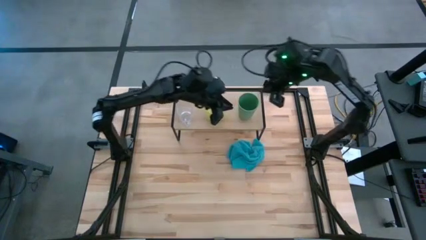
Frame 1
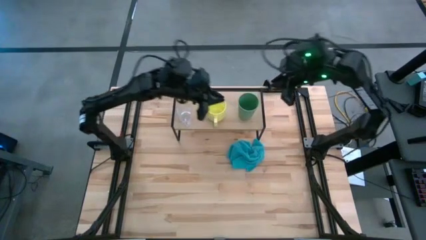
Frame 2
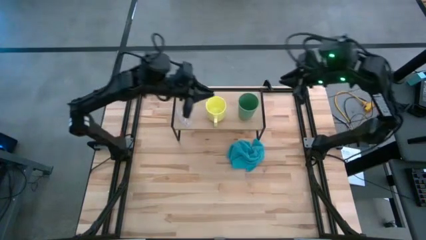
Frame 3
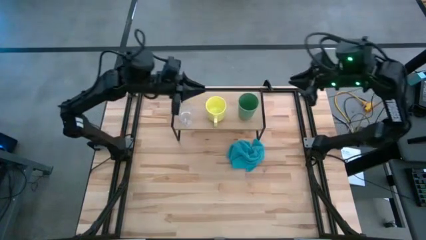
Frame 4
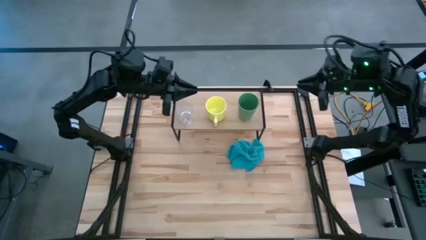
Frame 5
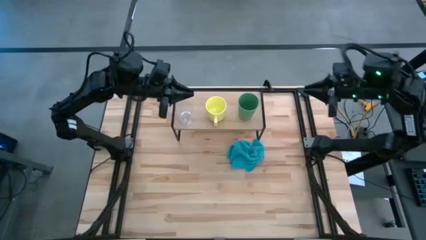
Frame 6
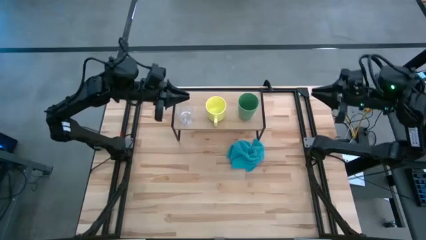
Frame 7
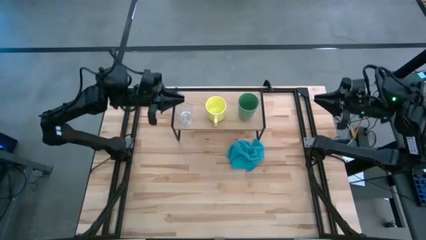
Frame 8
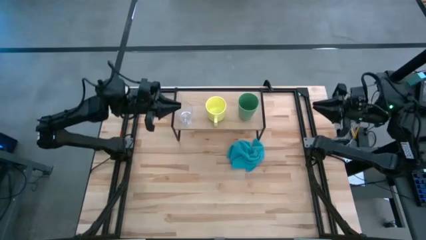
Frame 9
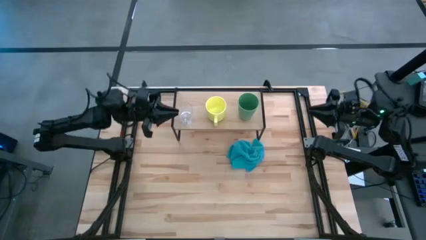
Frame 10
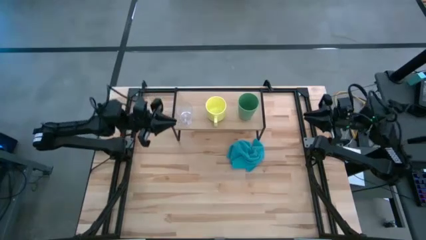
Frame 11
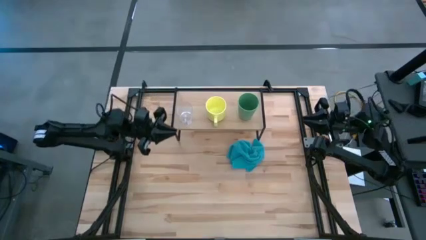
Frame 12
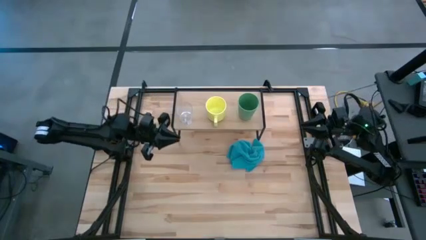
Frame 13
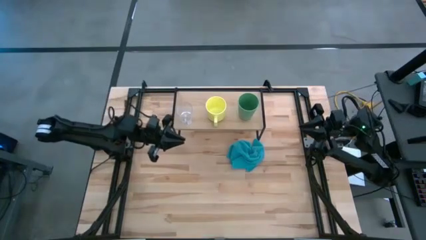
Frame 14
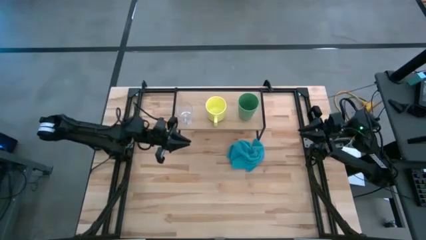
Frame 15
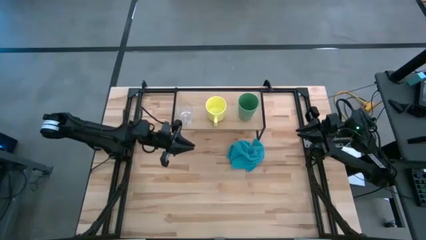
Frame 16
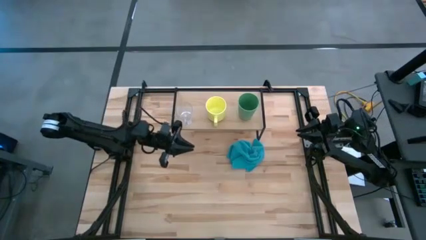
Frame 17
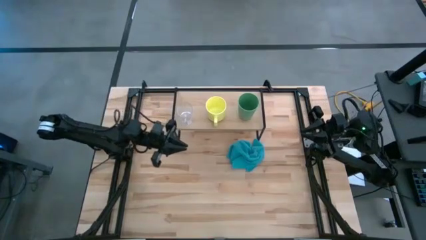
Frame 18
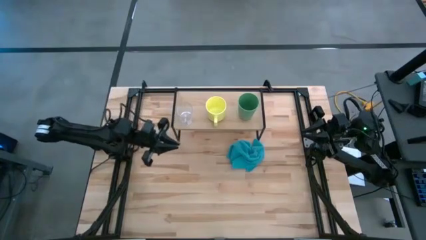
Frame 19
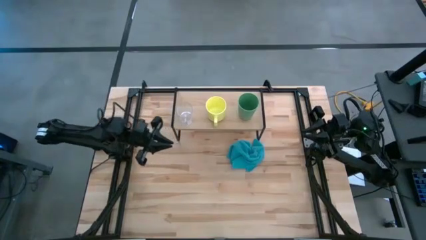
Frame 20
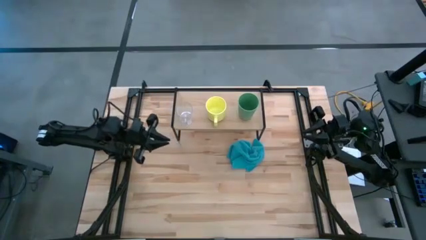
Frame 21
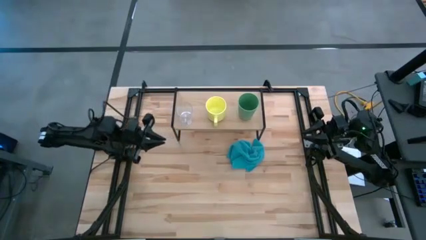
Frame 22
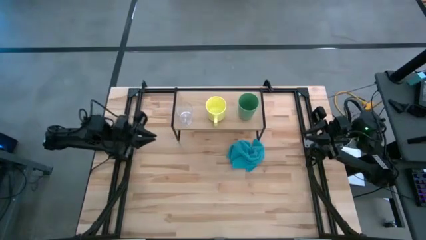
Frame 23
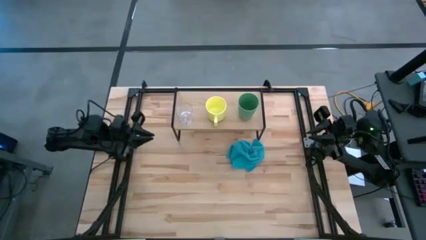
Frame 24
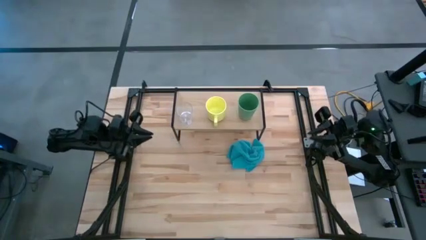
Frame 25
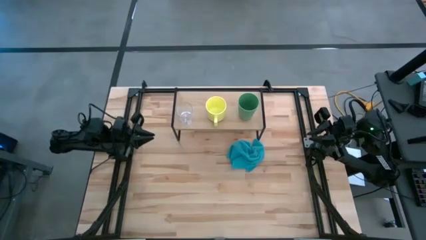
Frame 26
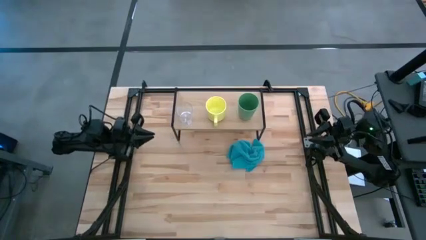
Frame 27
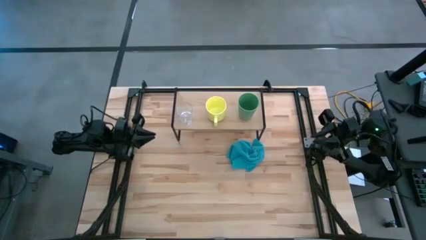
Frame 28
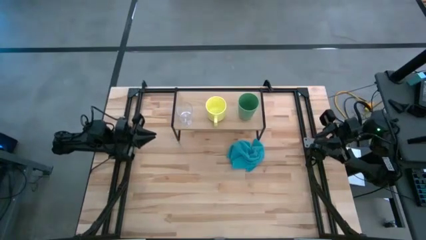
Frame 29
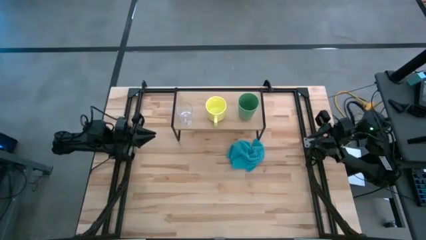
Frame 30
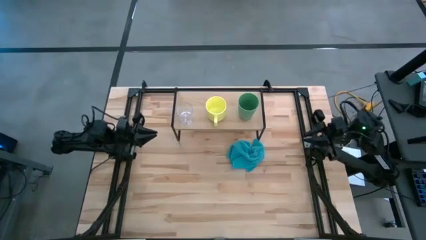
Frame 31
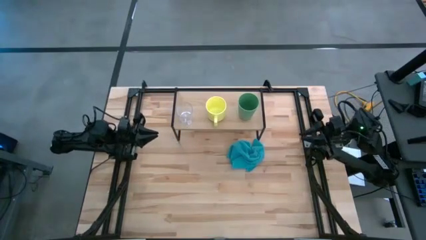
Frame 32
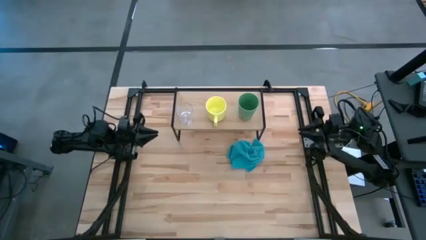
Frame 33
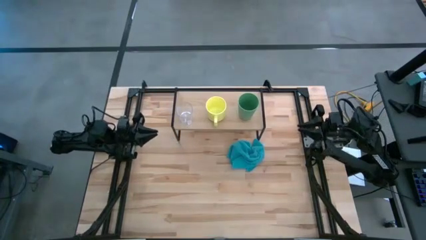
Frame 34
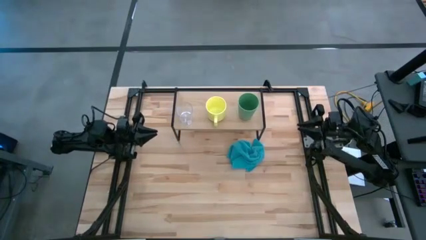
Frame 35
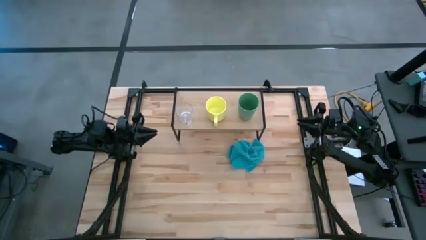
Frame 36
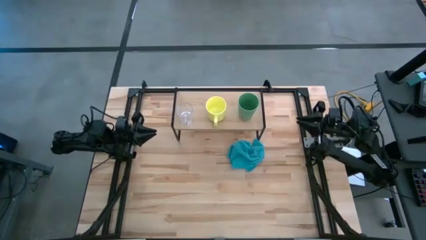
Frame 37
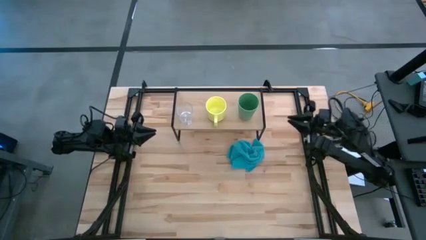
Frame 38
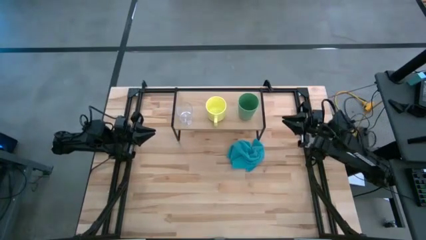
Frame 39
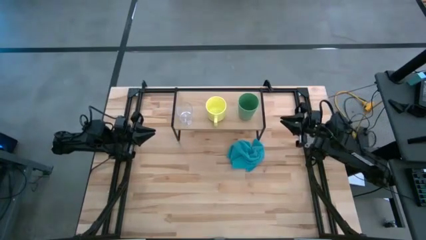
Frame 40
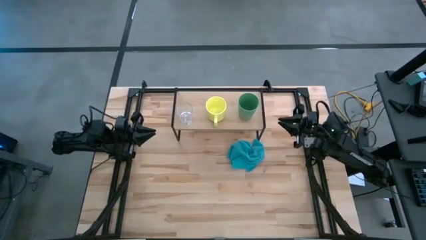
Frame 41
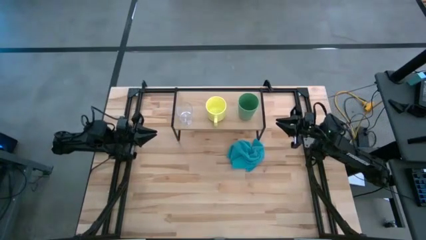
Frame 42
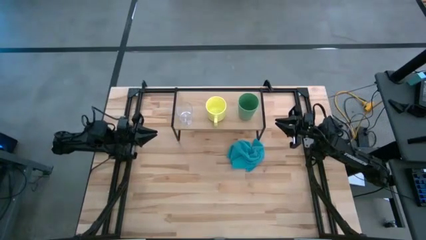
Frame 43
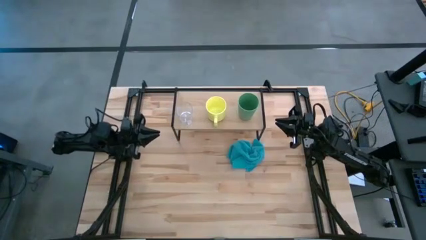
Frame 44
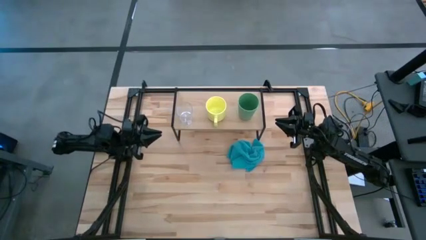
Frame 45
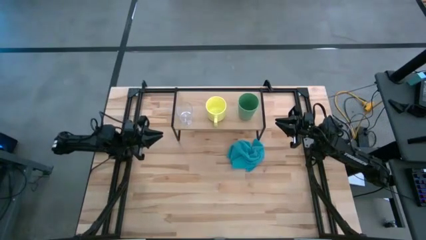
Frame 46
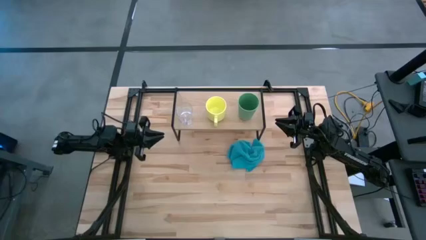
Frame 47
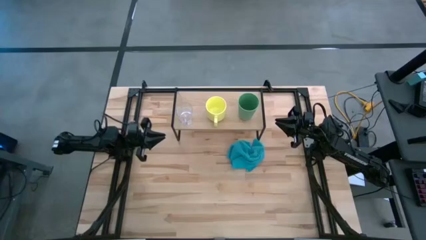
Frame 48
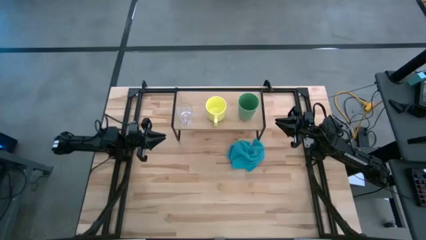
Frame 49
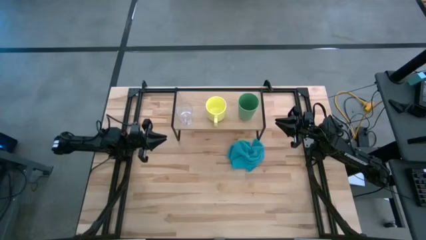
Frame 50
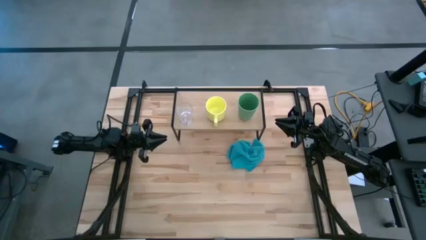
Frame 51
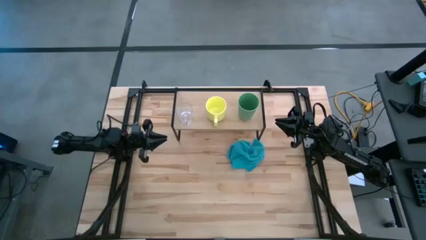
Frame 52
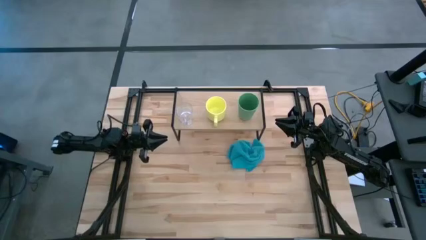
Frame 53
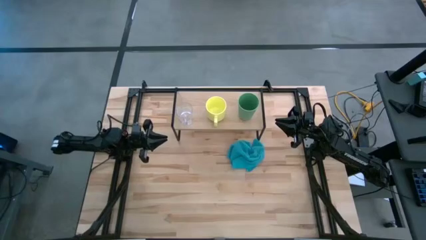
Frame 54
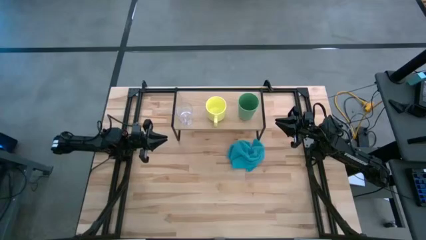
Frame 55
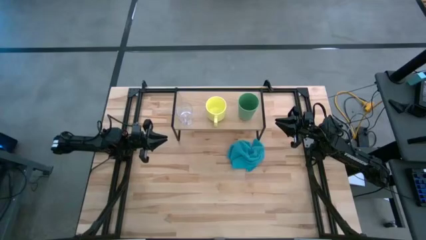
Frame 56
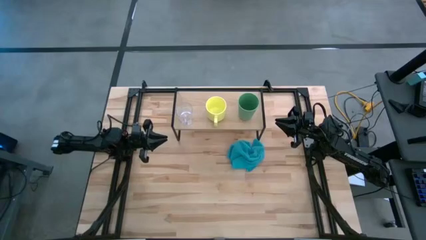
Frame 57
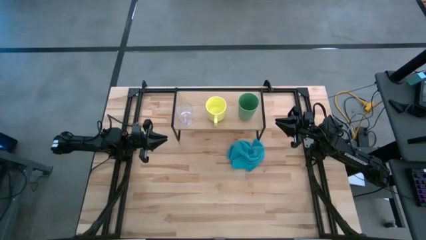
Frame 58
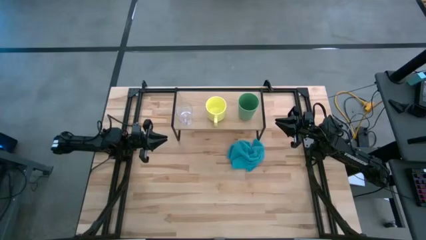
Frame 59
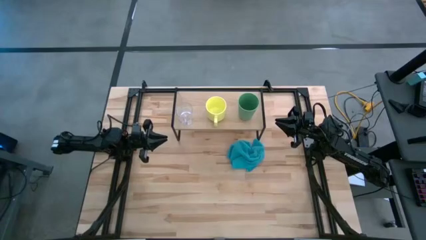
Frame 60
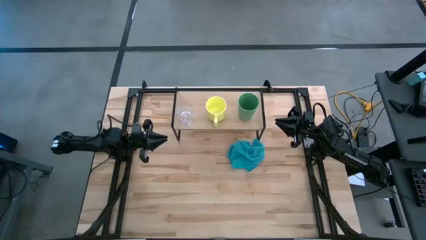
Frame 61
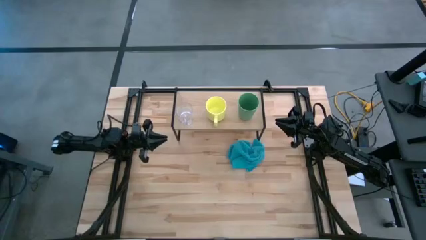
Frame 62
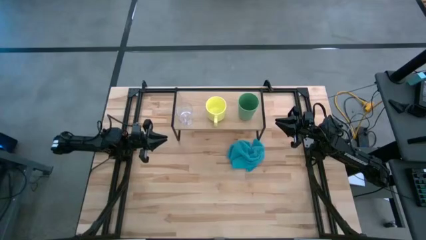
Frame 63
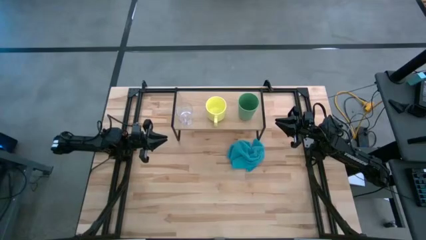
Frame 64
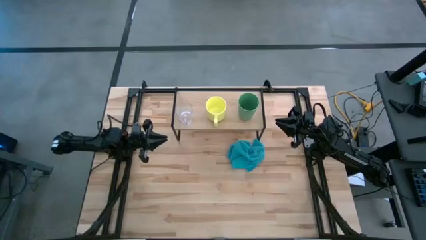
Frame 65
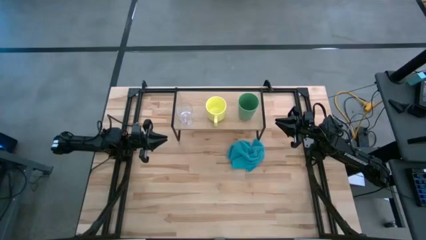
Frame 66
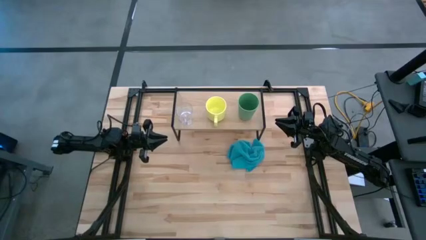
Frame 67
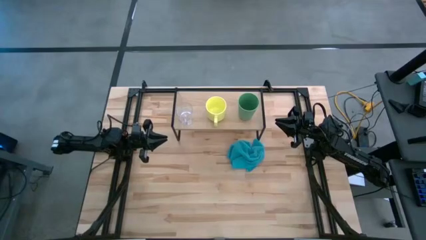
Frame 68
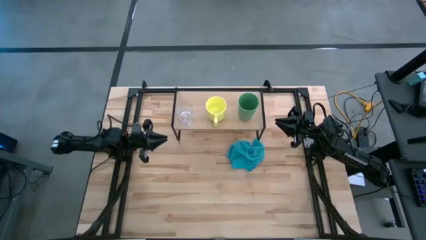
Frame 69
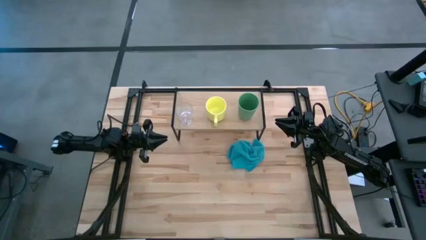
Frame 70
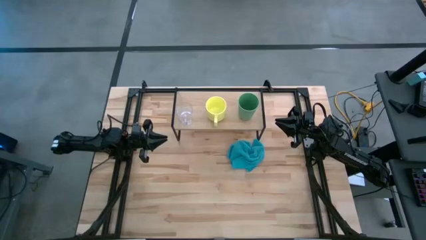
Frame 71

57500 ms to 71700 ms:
Task: Stack small to large cups/mugs on shelf
Return to Home Position
